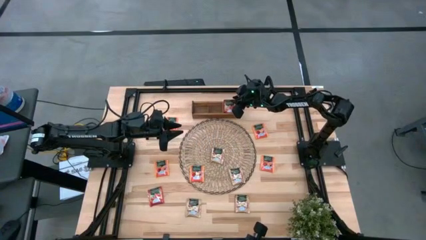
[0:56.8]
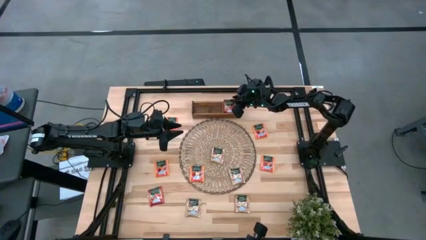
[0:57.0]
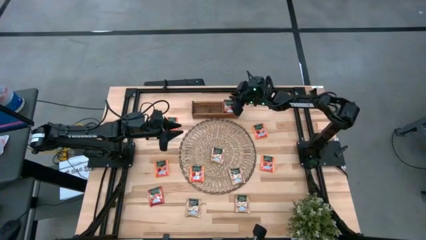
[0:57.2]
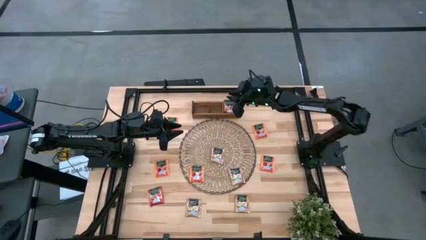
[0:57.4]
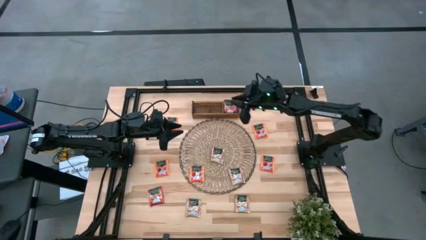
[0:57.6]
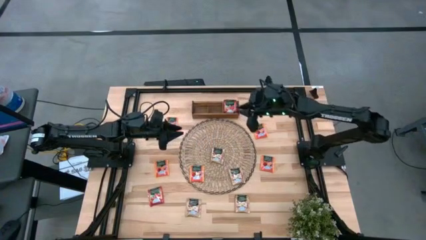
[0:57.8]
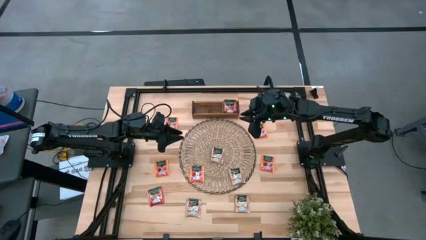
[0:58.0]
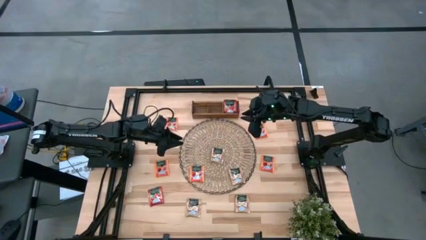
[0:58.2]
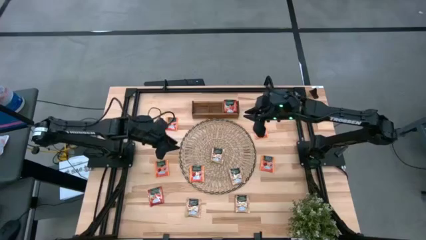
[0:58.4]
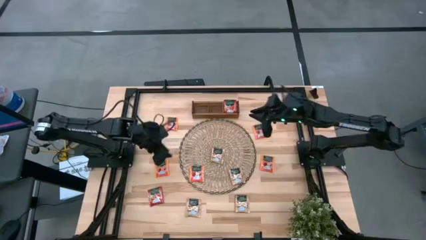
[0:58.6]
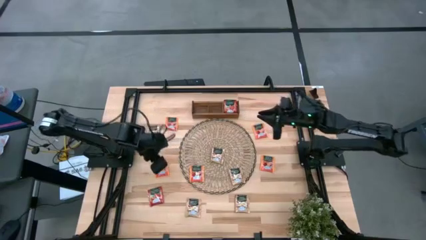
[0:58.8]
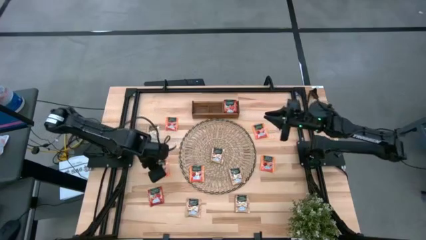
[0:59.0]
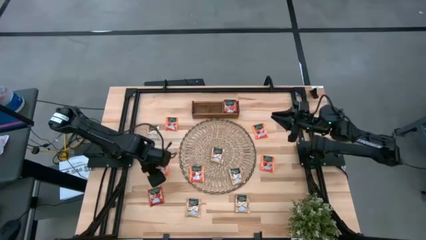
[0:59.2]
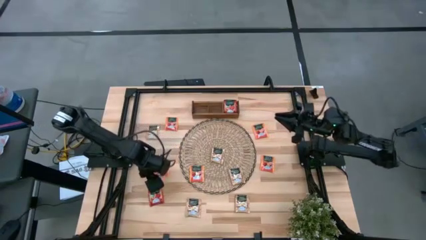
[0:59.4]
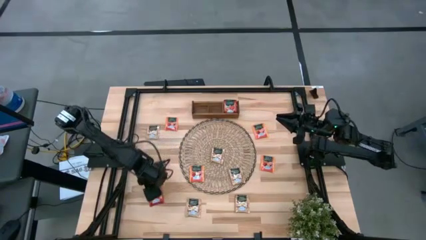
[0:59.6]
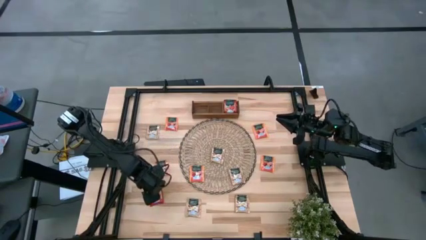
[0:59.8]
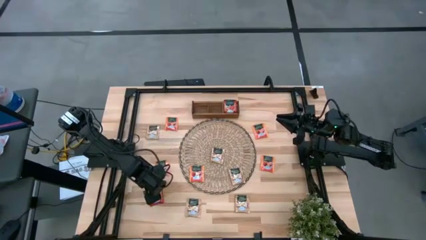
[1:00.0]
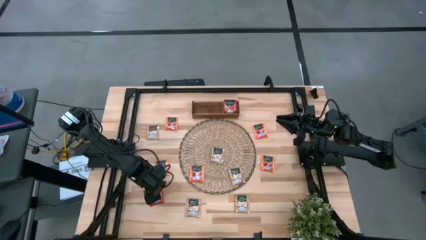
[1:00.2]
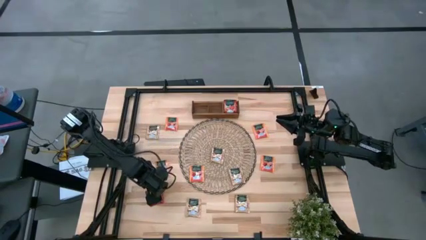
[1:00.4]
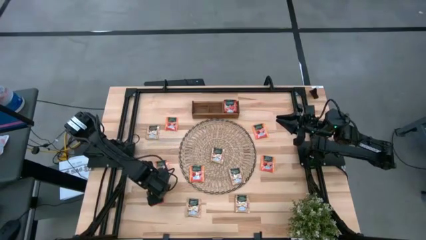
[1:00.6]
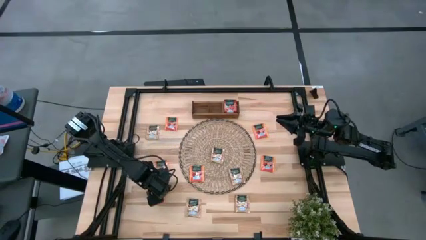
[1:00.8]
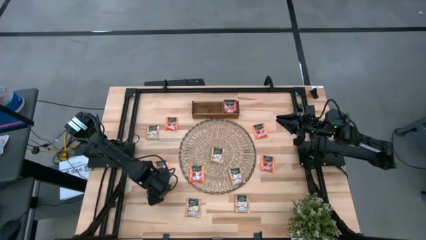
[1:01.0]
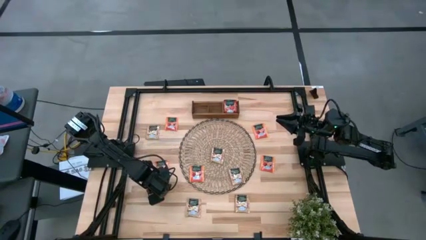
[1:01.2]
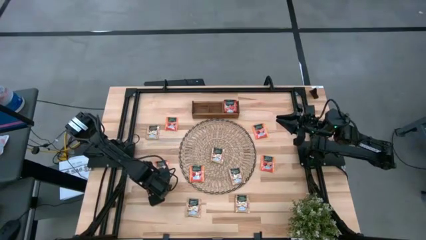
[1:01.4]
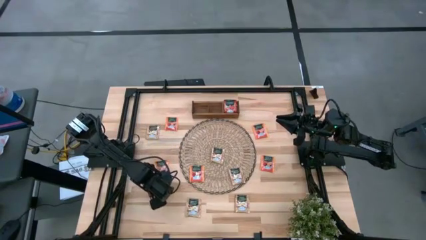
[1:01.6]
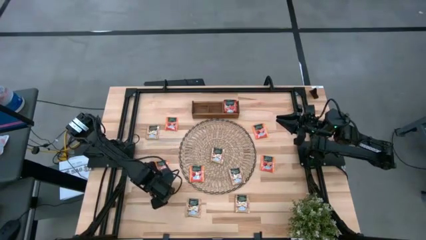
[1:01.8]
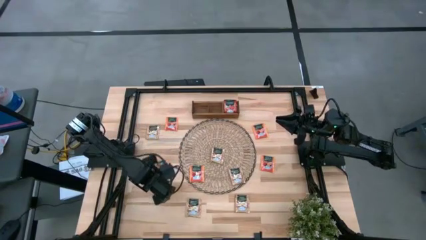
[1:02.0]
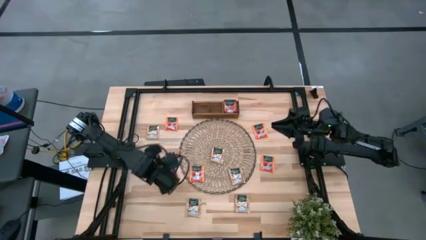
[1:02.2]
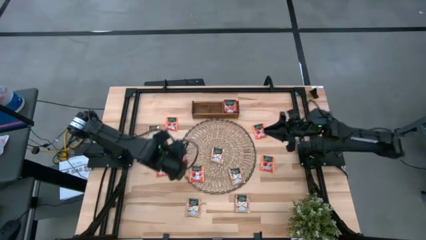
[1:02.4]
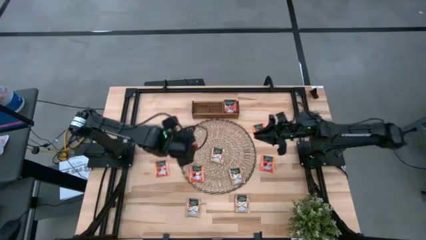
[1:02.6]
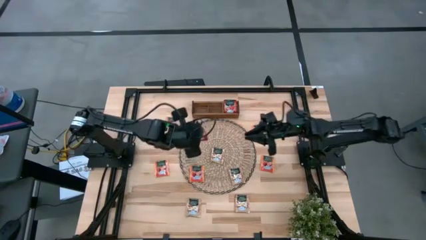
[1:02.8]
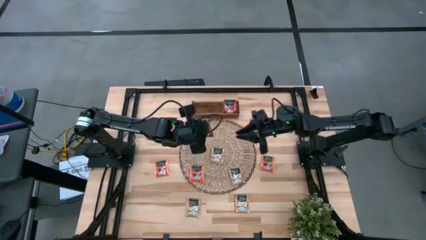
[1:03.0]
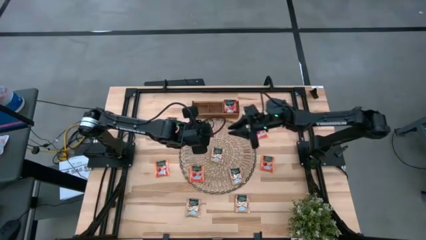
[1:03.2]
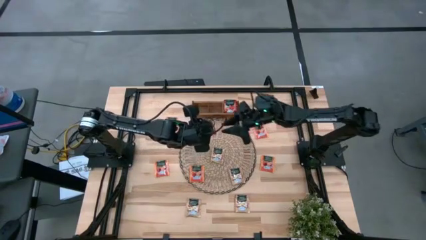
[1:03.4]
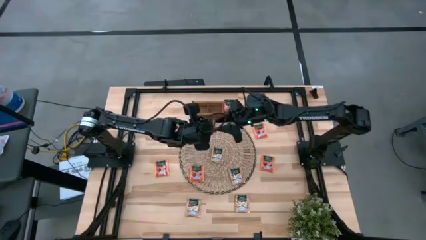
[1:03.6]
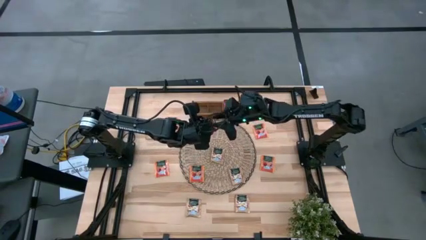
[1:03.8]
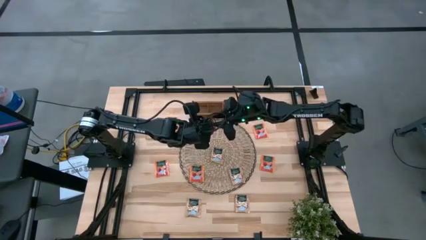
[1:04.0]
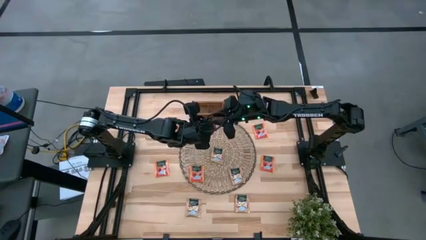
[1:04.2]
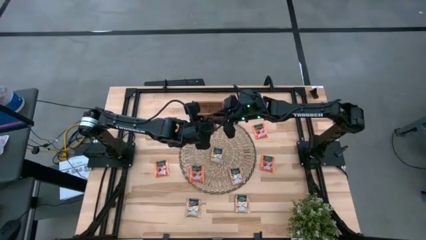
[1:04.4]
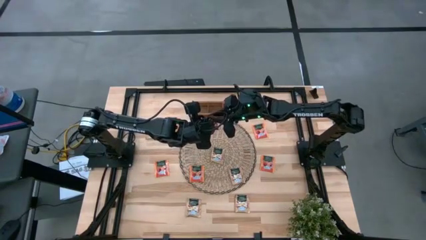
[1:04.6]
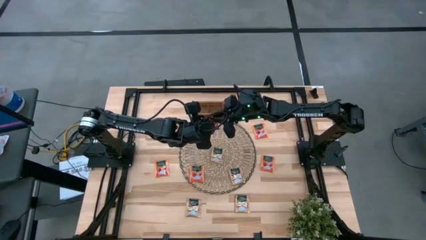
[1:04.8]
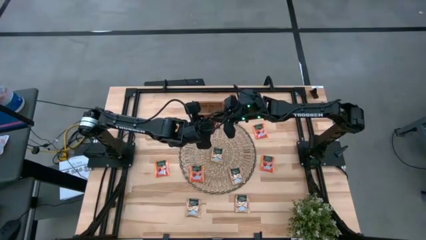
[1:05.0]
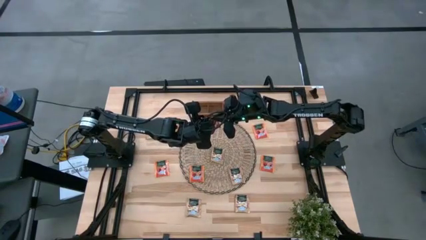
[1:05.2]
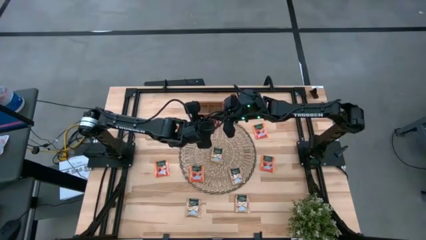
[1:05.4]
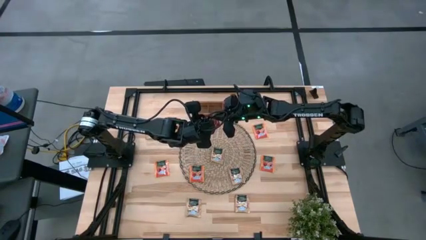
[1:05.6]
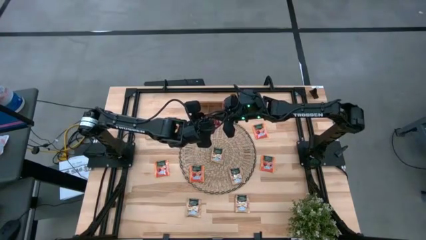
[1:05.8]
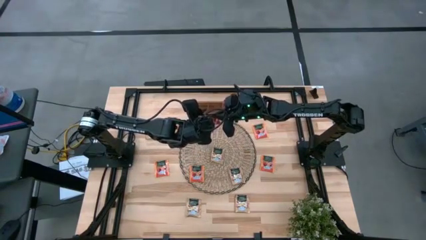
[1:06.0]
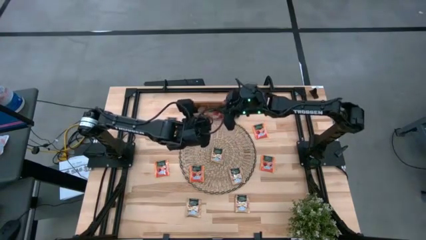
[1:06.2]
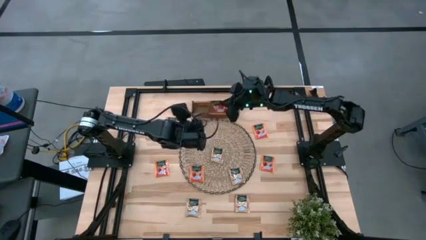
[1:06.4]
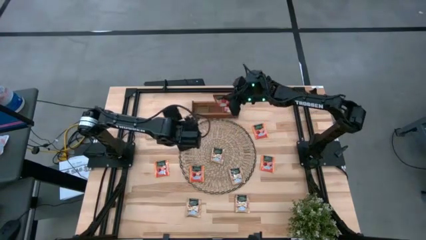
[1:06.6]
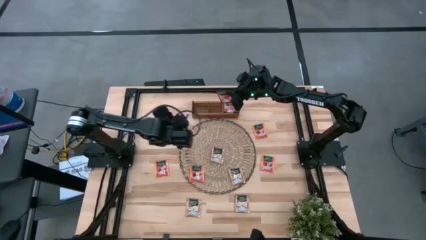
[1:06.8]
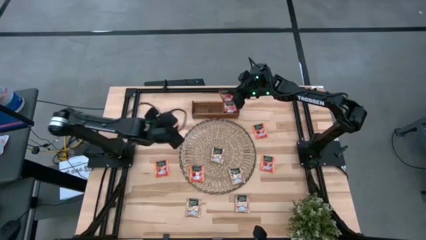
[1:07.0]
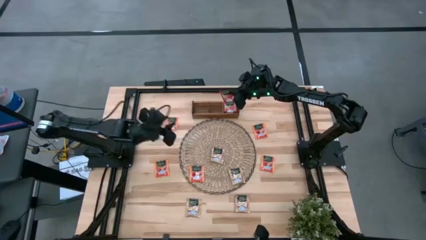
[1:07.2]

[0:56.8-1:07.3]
Task: Pick & Place Tea
Put the red tea bag into the right section of the wooden organizer
